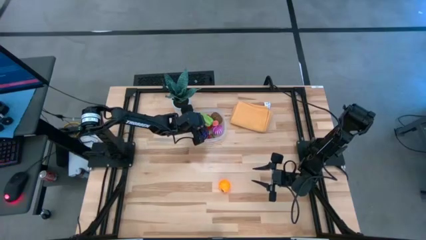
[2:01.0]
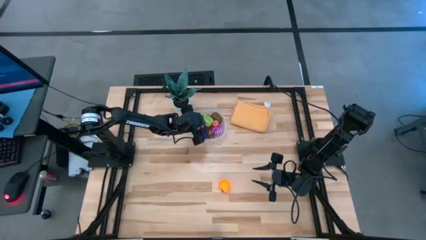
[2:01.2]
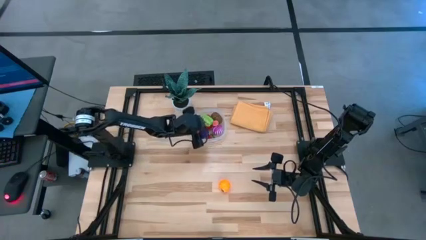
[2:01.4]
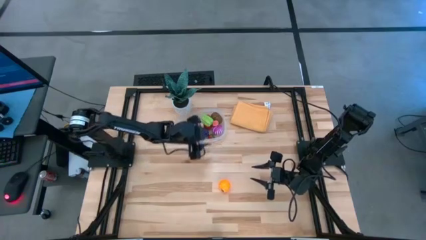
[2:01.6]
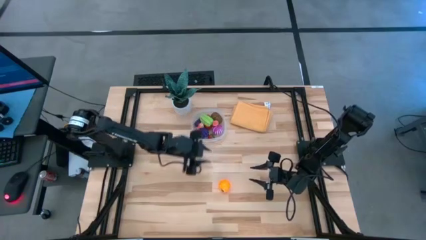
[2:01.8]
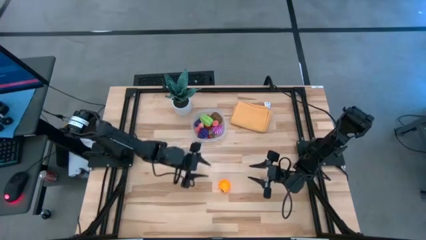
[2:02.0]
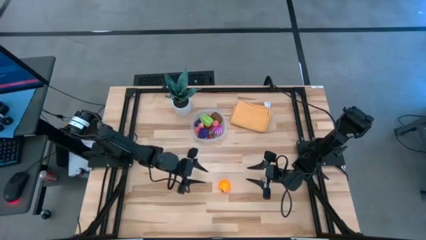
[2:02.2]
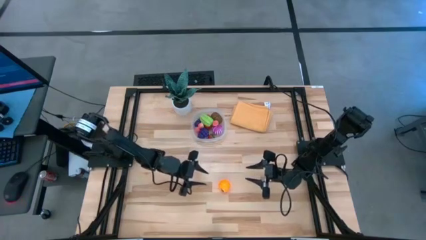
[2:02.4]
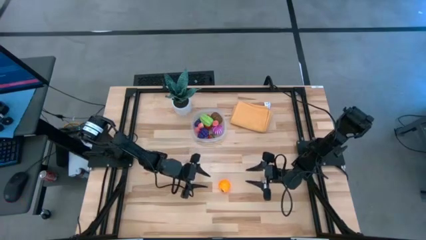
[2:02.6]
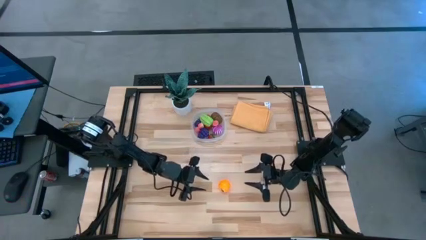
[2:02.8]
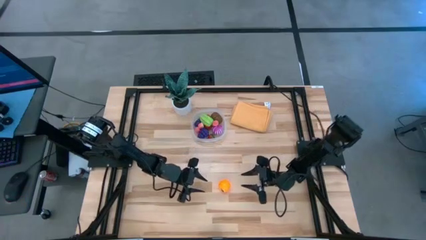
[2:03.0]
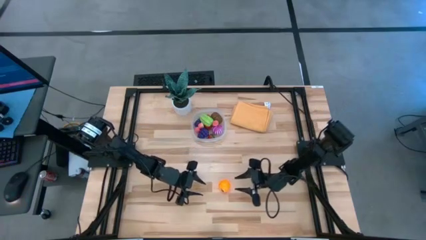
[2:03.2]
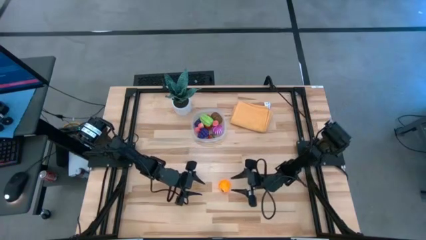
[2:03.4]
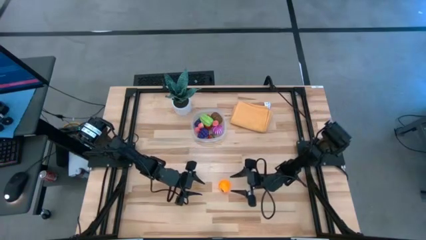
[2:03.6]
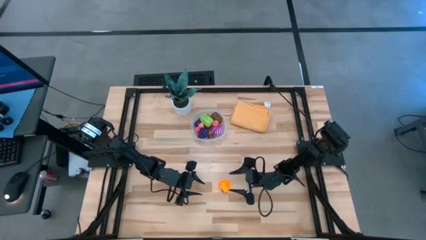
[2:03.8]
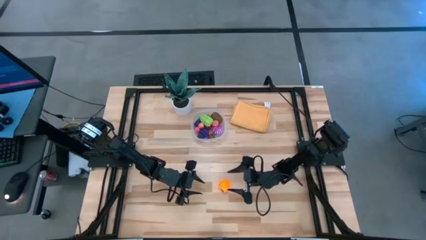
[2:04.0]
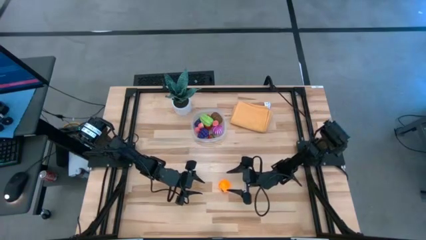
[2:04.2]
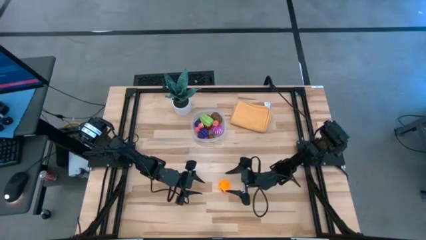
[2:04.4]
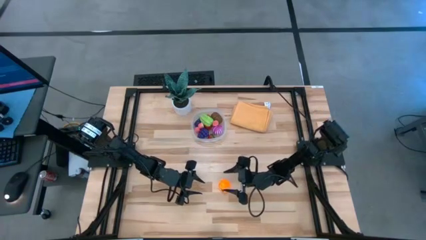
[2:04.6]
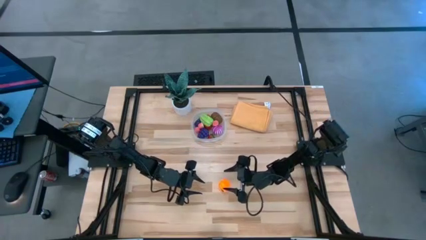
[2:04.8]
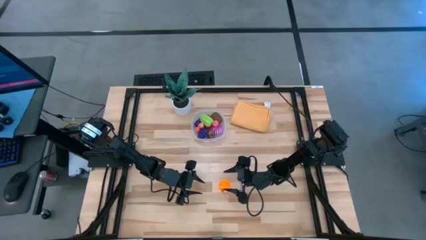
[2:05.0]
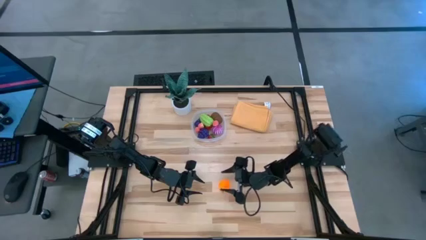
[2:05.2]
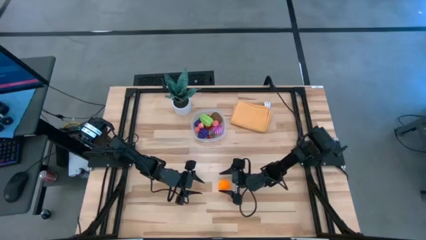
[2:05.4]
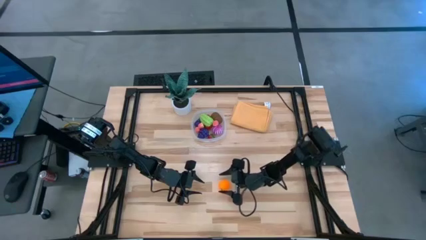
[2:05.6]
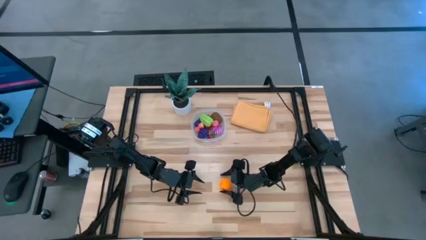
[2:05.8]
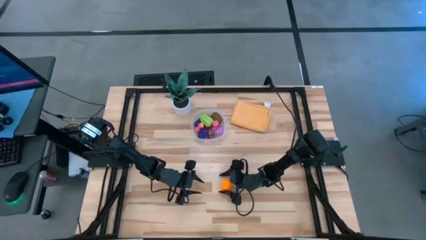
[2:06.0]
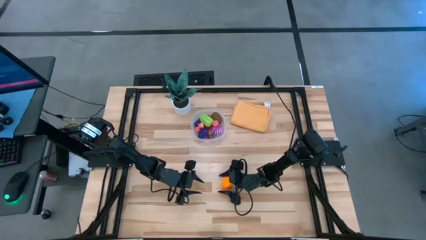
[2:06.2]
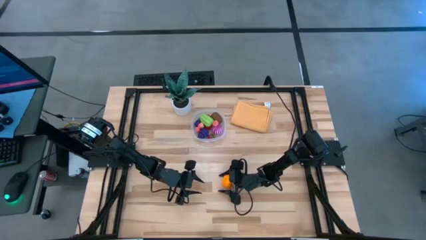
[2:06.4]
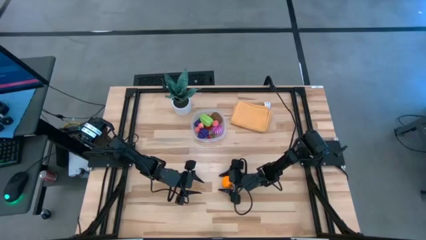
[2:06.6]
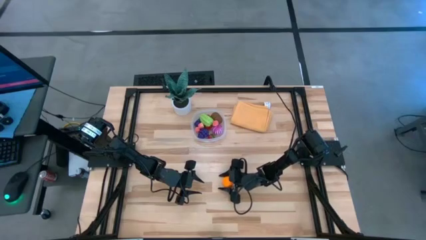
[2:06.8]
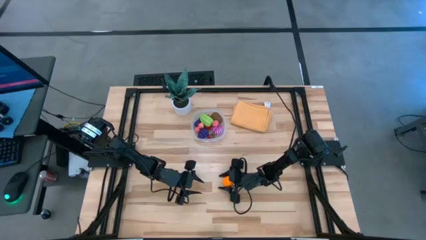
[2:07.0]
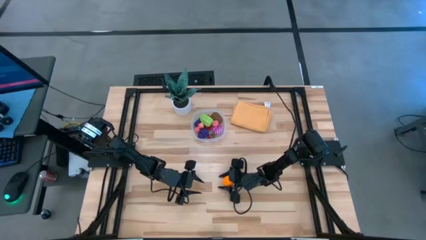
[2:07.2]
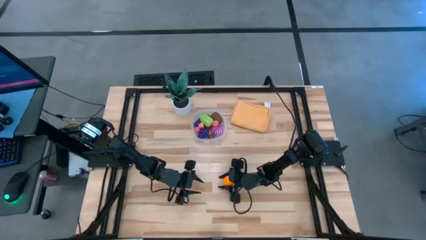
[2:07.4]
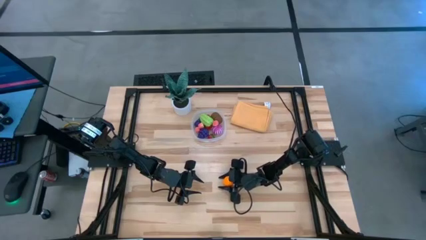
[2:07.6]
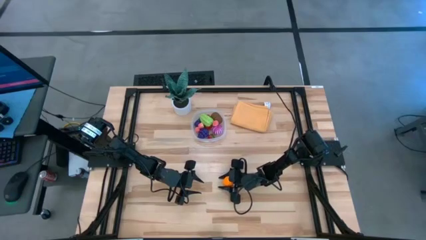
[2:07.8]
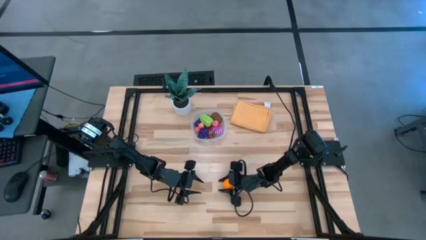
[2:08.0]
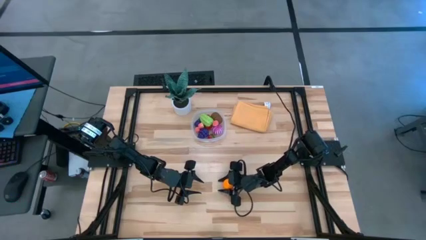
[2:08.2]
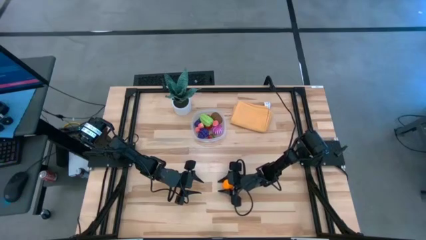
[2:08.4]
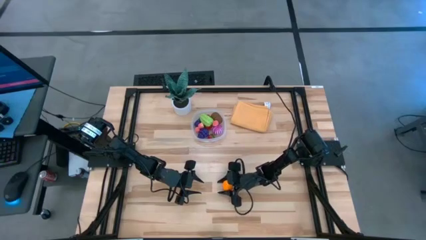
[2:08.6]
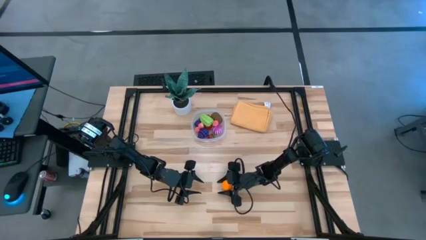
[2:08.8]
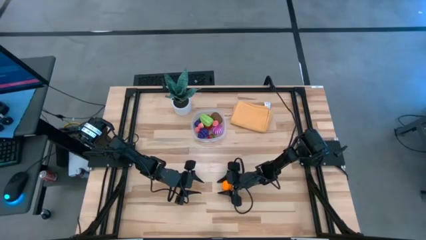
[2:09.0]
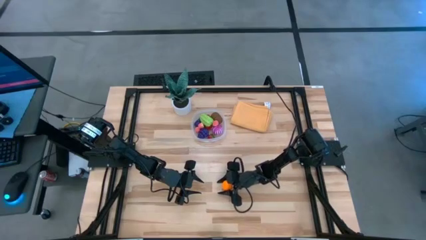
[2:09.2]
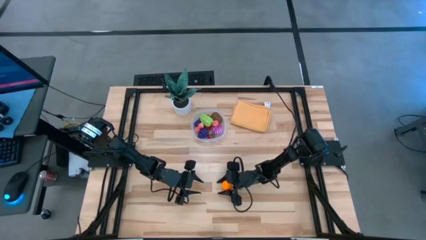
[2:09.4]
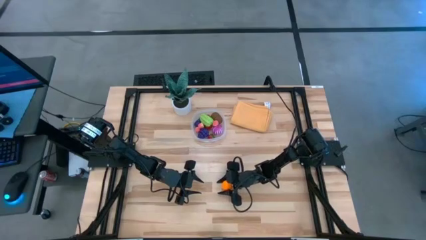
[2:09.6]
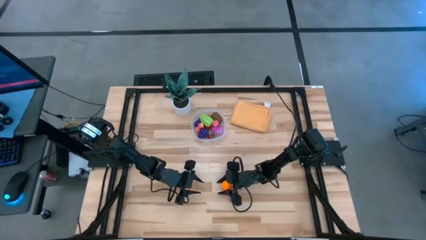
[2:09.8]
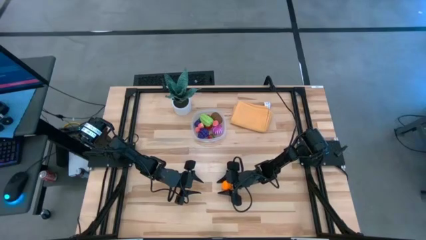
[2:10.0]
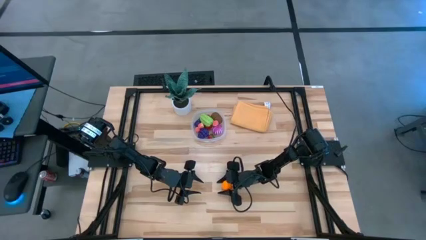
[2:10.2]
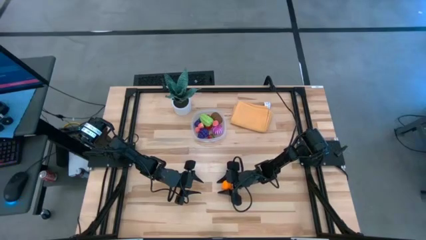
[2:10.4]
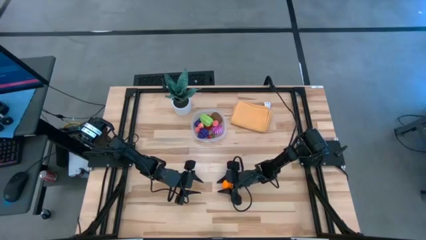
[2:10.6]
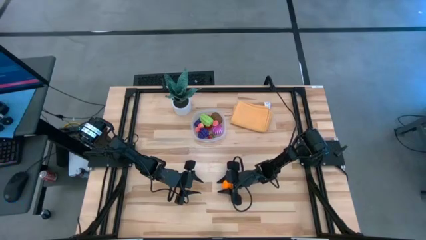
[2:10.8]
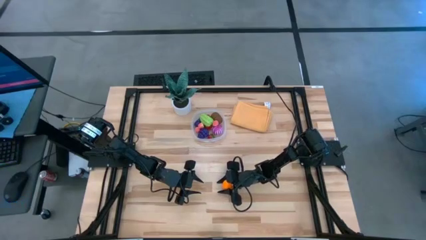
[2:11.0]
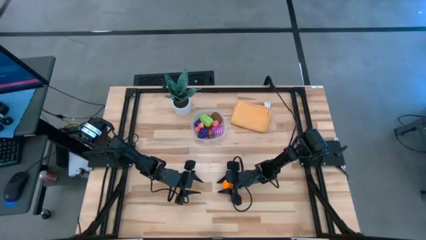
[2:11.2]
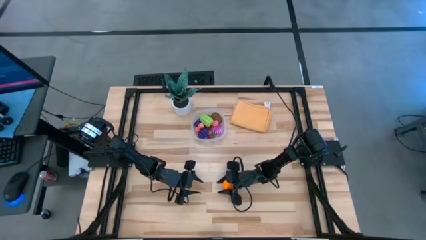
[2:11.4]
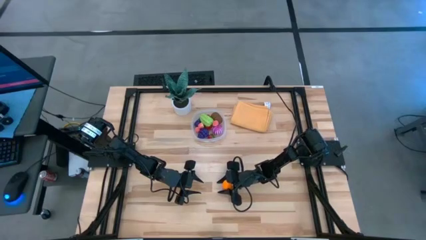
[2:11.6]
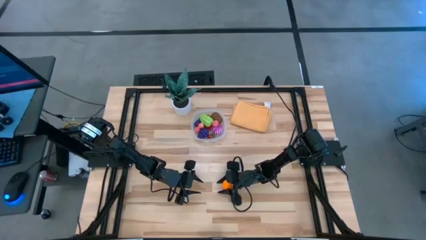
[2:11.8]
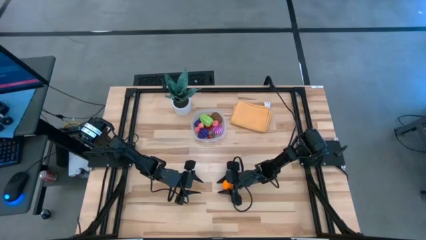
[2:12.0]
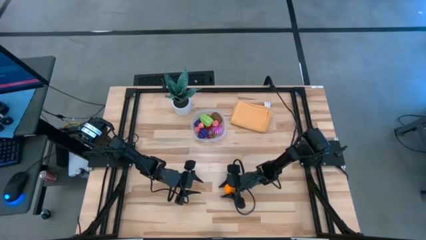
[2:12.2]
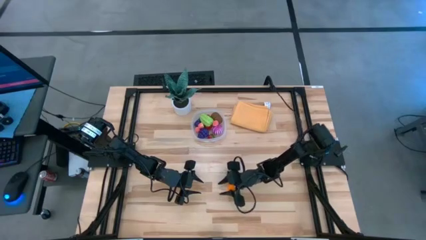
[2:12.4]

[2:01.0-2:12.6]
Task: Pick and placing Produce into tupperware
Put the orange into the transparent bin

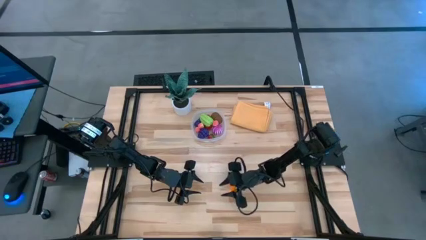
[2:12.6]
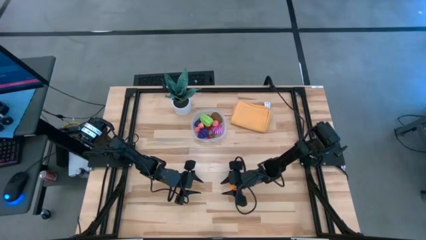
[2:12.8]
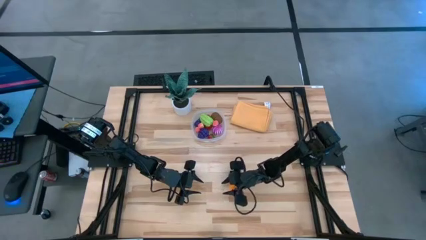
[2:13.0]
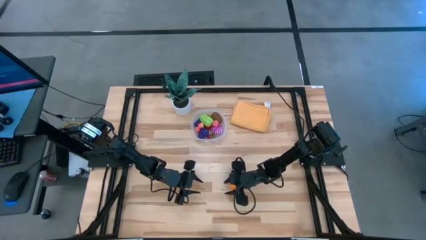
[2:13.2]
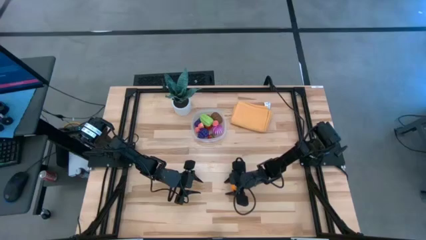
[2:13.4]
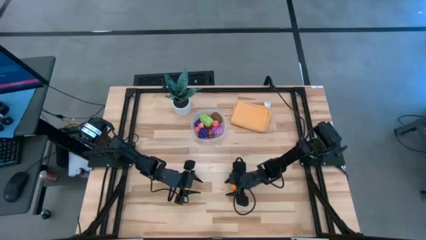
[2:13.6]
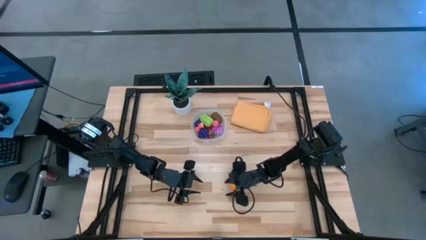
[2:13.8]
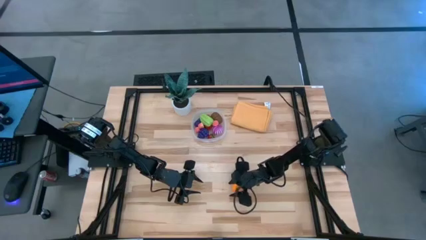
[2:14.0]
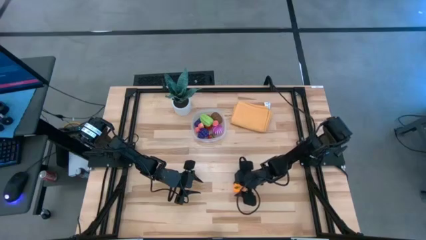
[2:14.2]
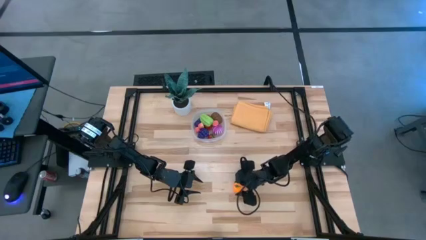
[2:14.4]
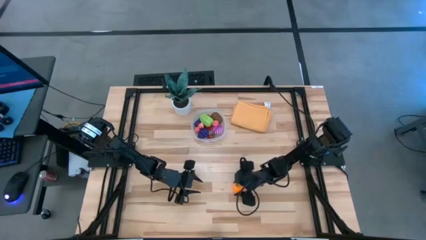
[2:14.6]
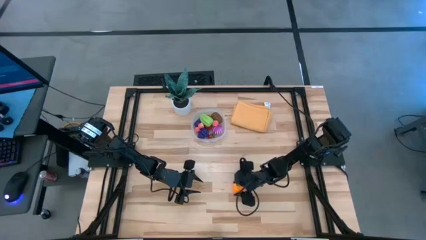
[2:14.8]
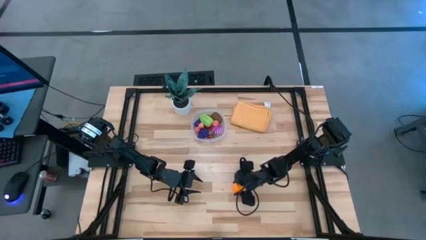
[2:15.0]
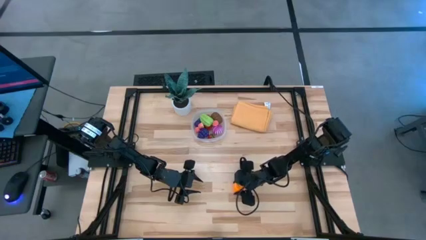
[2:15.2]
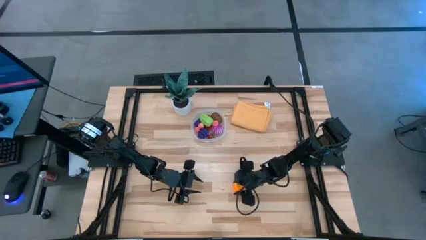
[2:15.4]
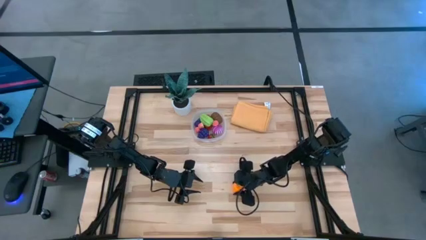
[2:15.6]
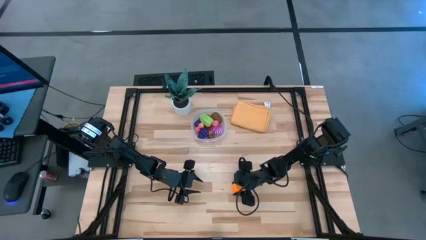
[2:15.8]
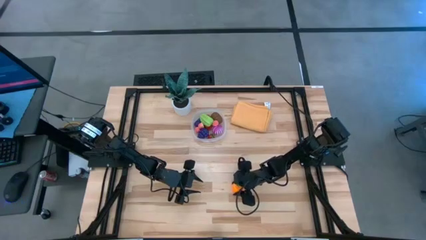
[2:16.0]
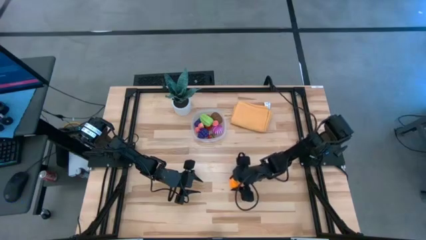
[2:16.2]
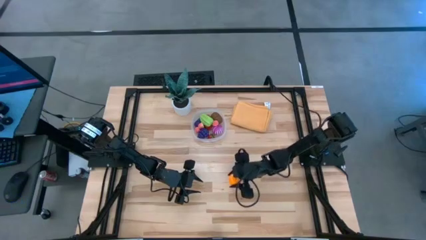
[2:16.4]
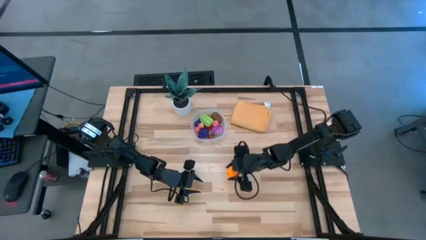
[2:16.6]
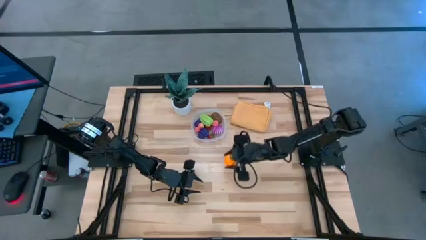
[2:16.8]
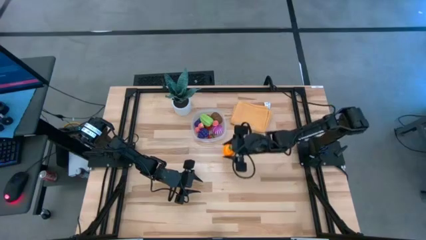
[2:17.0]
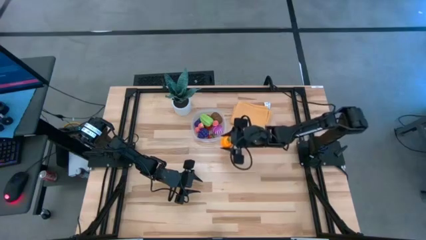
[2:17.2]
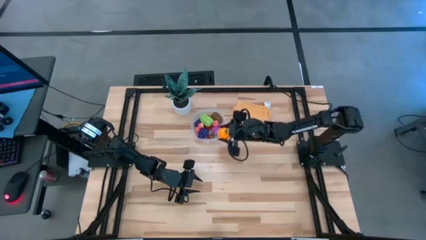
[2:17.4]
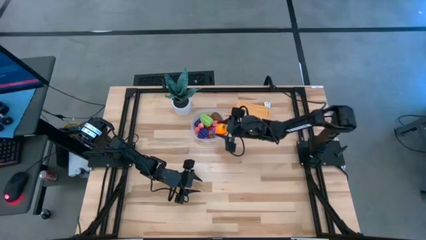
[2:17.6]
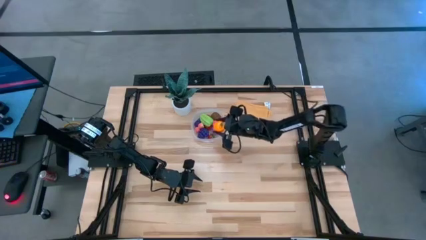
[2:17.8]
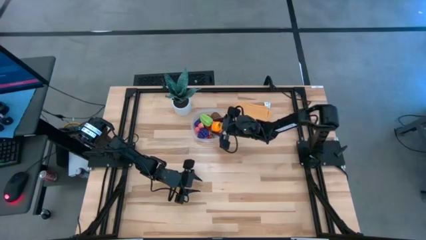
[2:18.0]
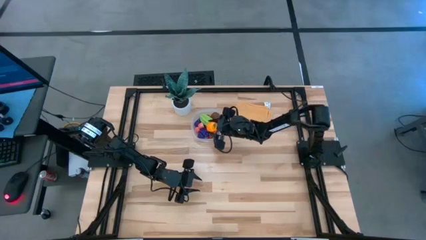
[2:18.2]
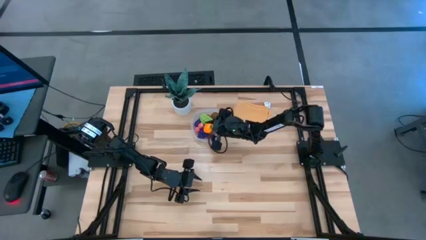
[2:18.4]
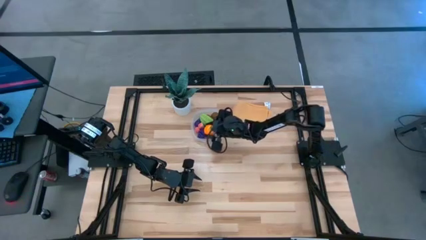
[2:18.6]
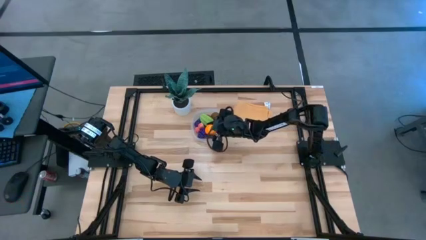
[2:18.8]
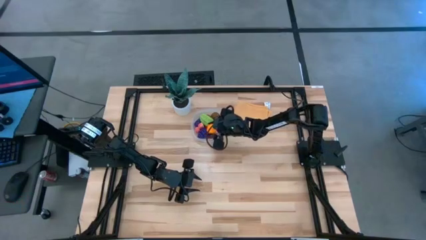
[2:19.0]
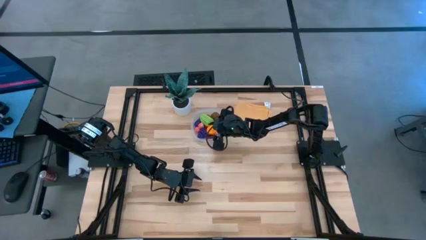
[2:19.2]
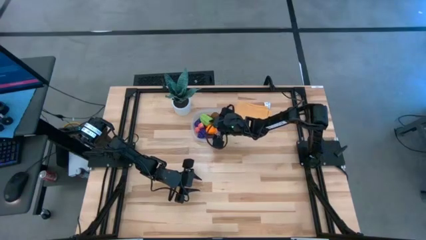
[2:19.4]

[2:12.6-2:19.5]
Put the orange into the transparent bin
